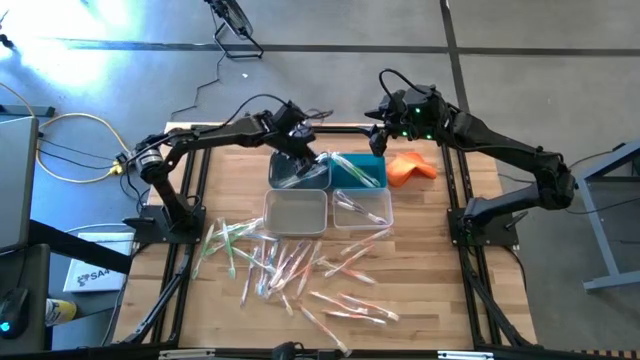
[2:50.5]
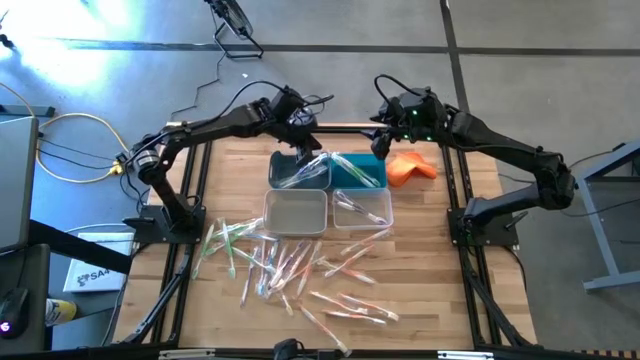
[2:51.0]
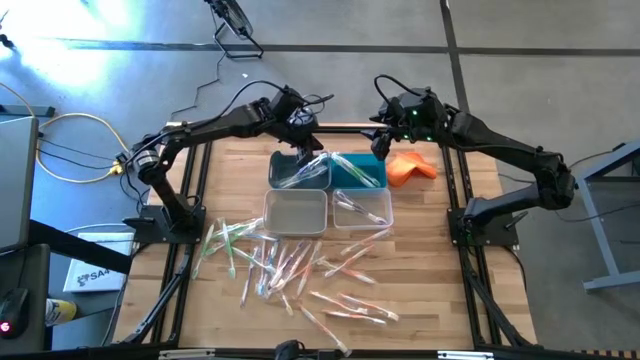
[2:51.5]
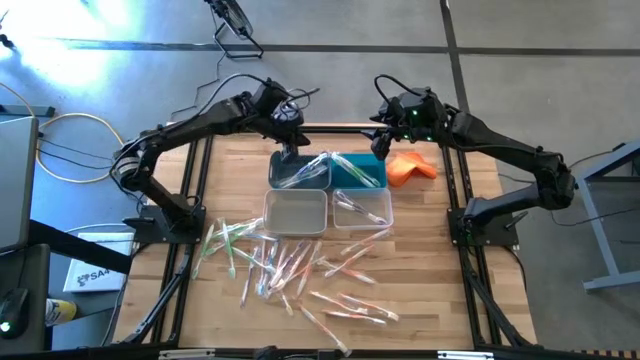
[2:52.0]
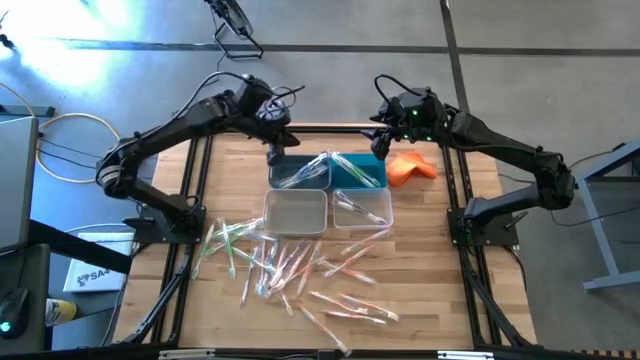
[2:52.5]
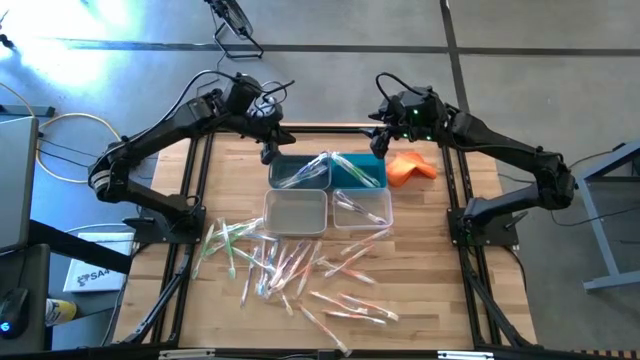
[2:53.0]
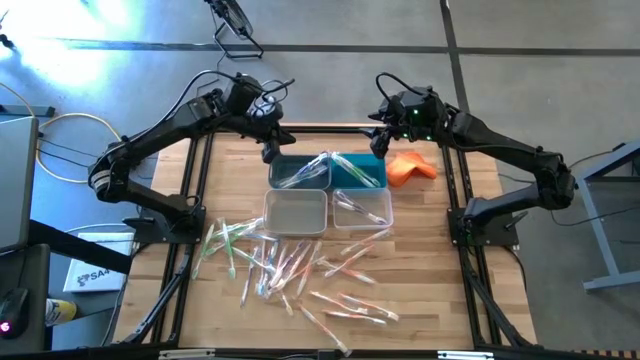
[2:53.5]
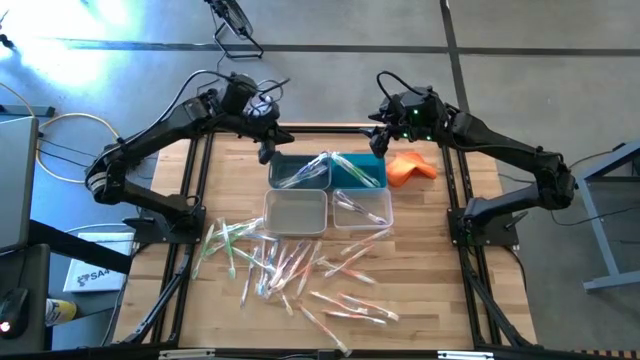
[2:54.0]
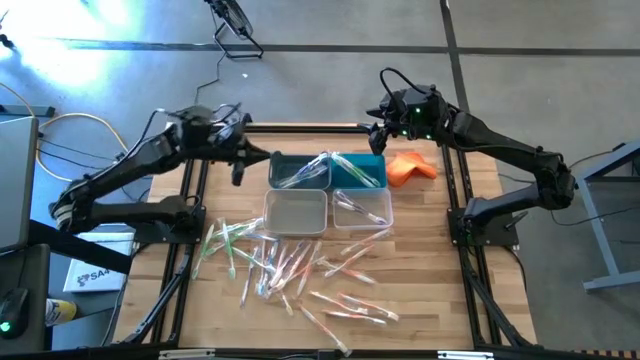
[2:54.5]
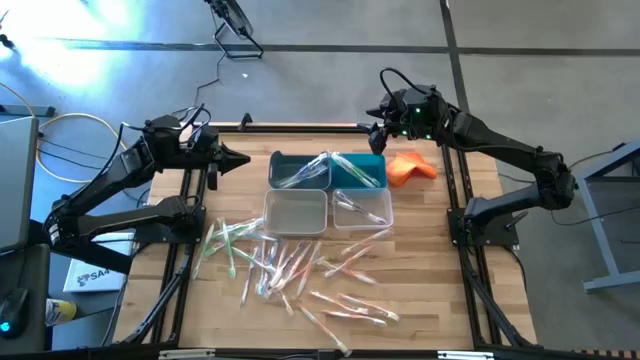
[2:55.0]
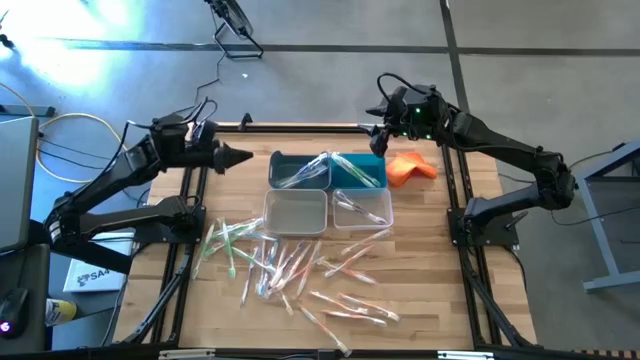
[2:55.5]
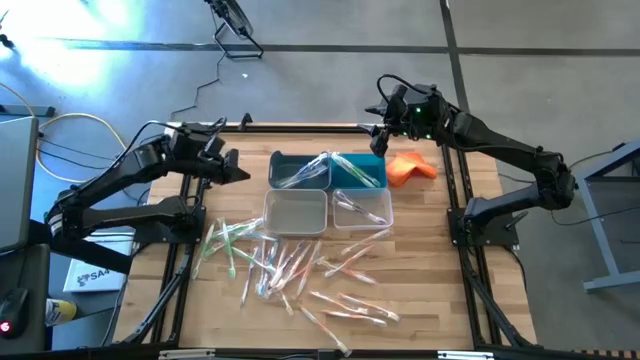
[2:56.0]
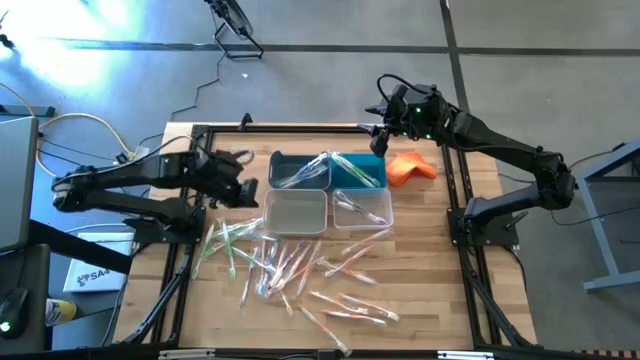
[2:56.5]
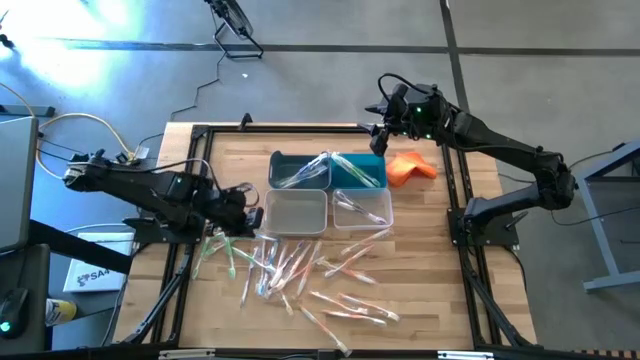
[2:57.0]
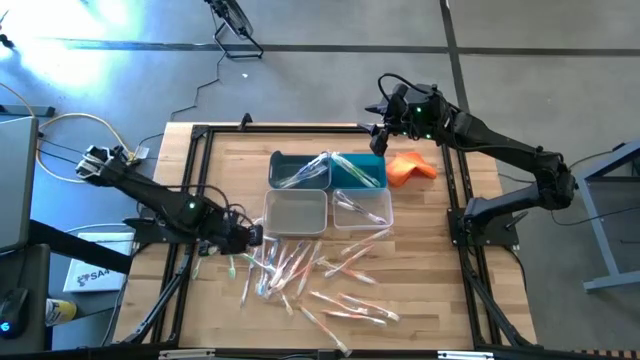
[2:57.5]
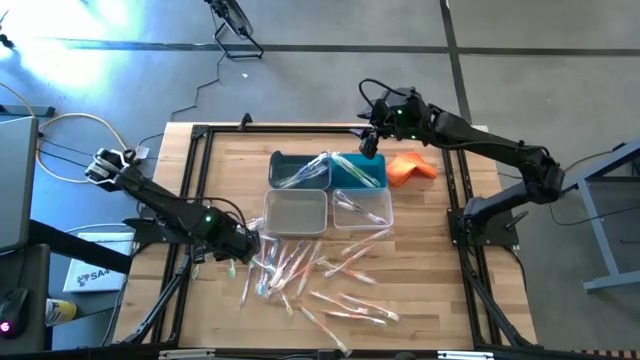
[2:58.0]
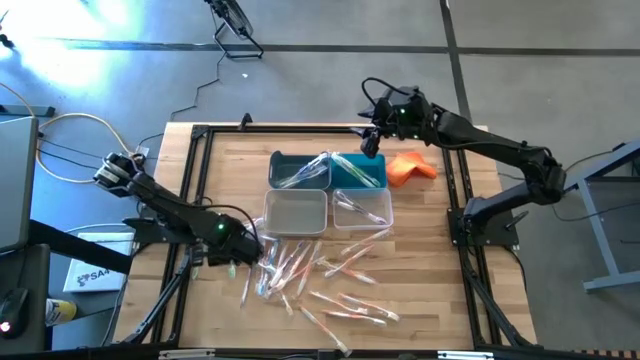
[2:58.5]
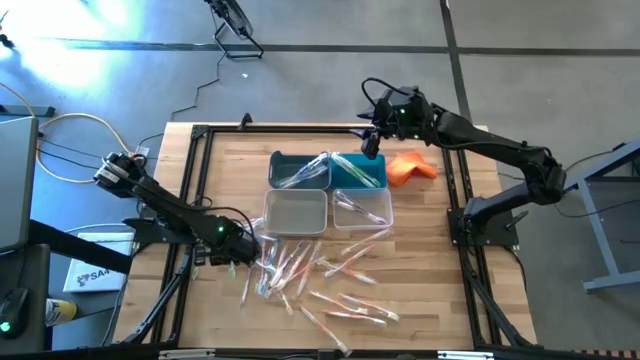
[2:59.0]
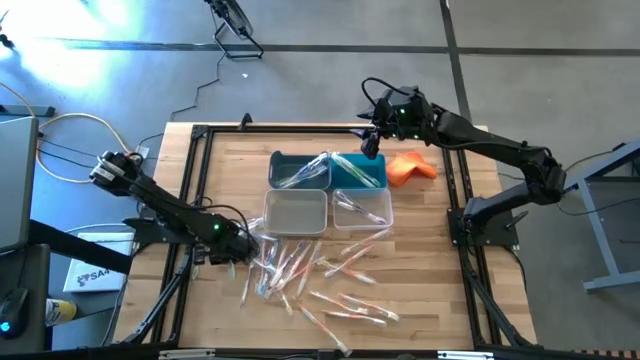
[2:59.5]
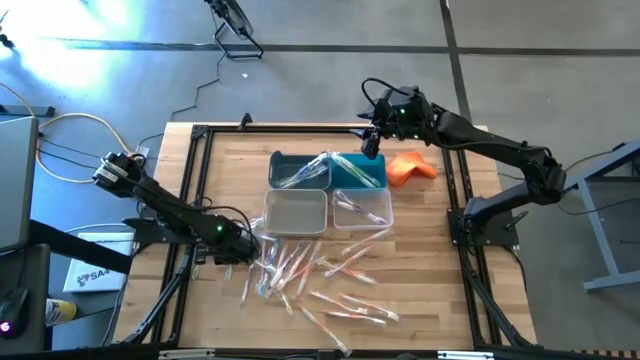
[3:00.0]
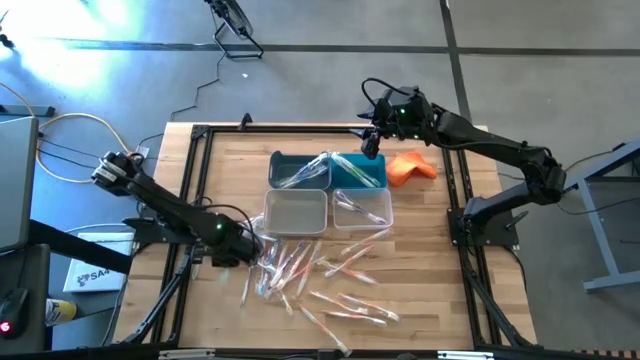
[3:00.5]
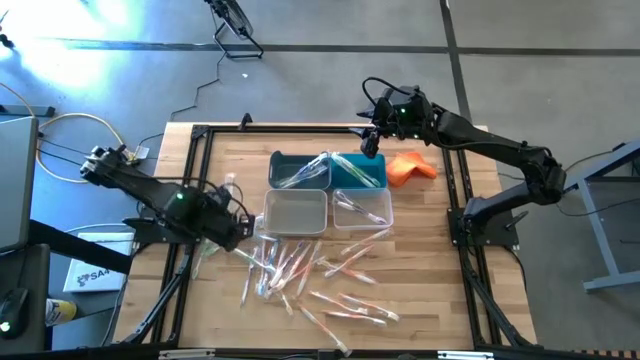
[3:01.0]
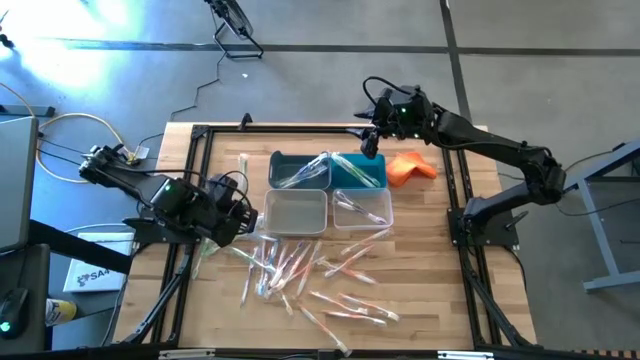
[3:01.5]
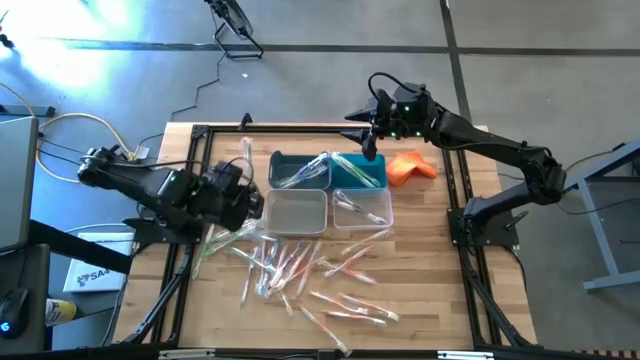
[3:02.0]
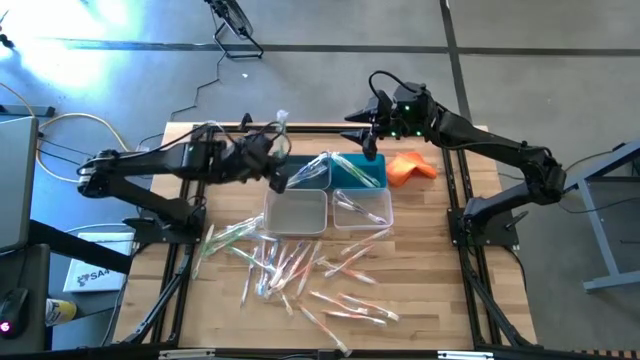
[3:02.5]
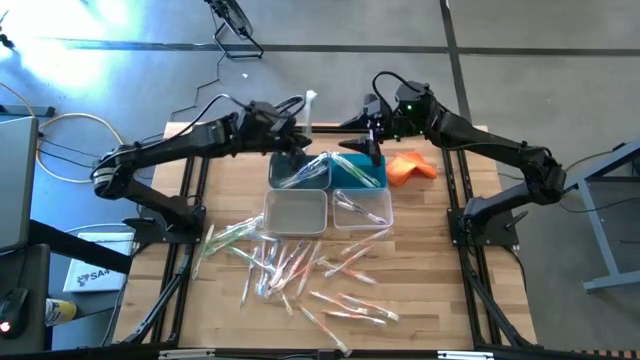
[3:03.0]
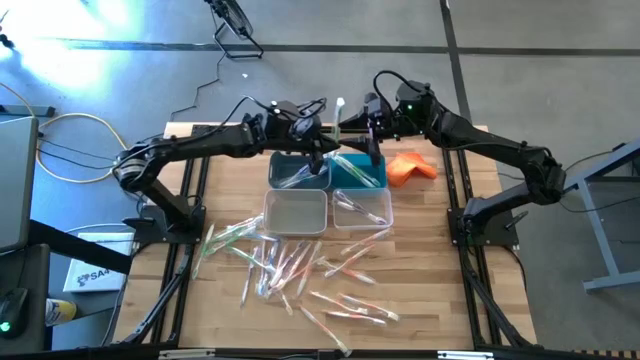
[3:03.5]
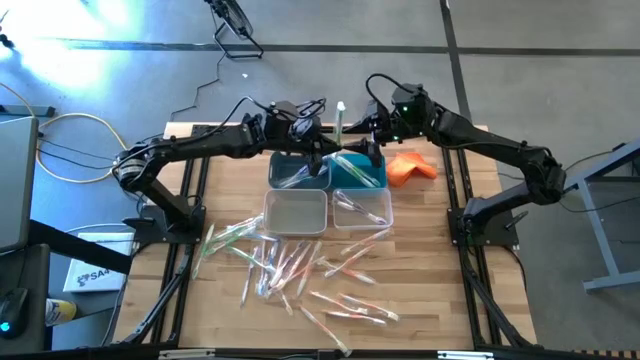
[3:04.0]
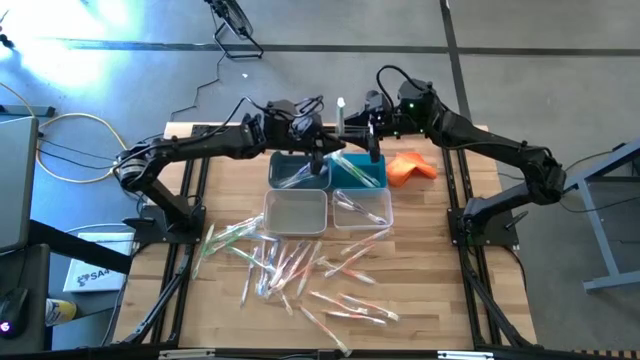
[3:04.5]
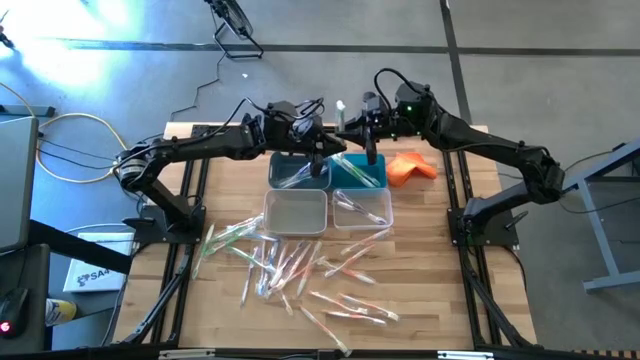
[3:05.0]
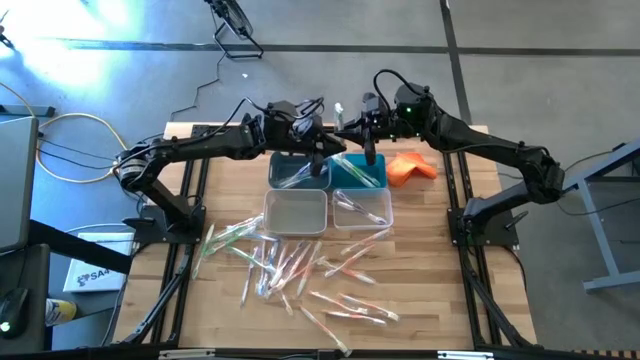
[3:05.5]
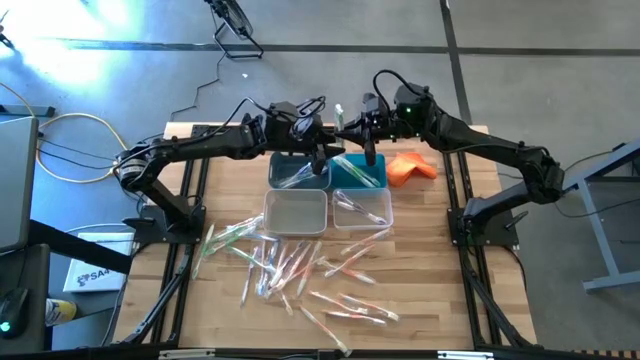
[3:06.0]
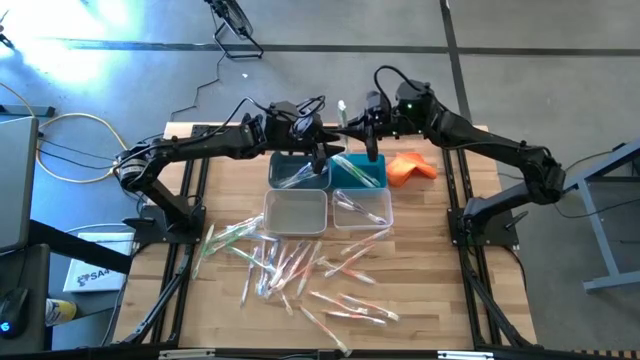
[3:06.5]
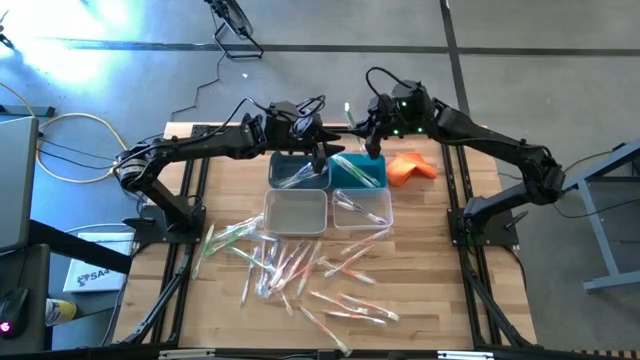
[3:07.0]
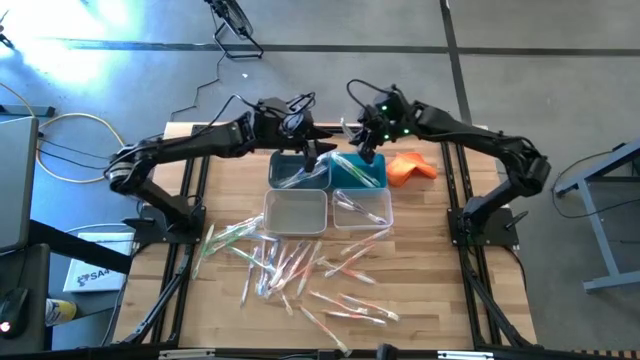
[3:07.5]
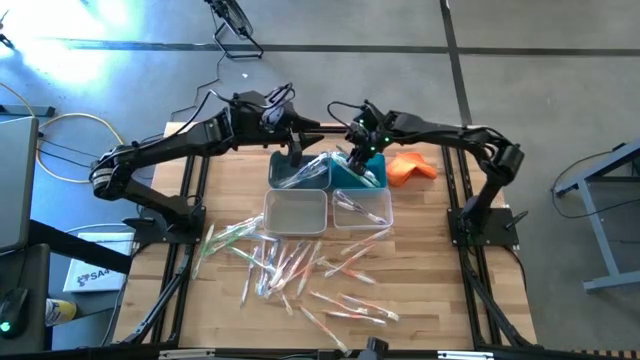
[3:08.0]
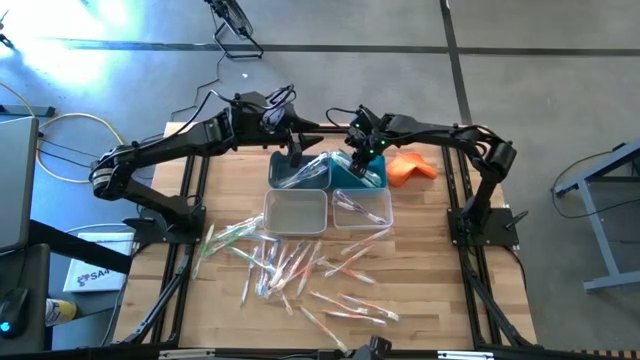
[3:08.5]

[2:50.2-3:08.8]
Task: Pick & Place Toothbrushes
Put the green toothbrush into the blue bin

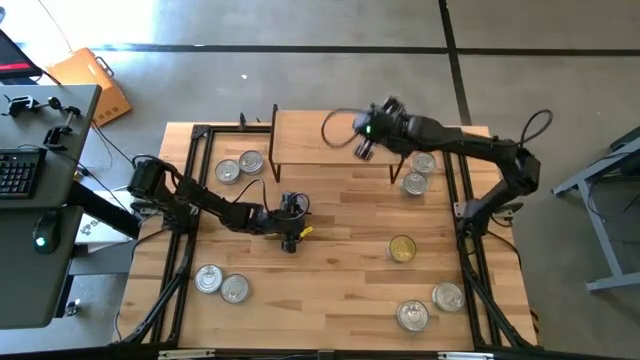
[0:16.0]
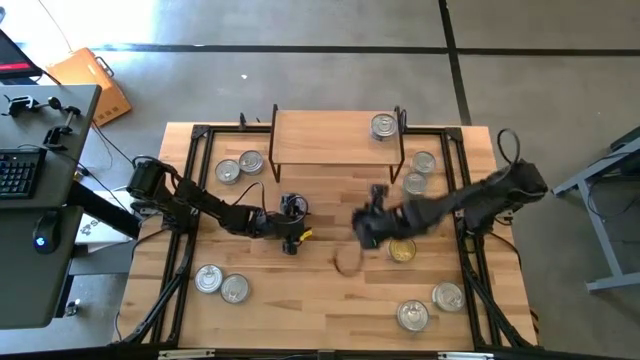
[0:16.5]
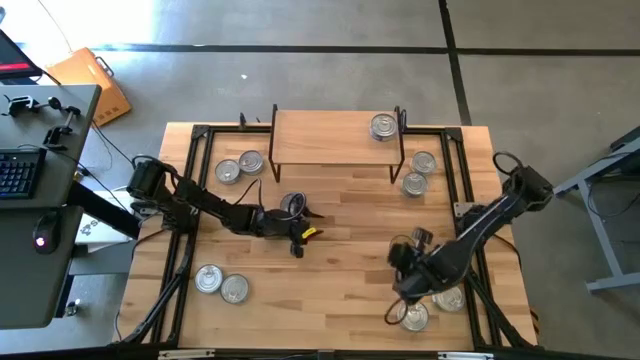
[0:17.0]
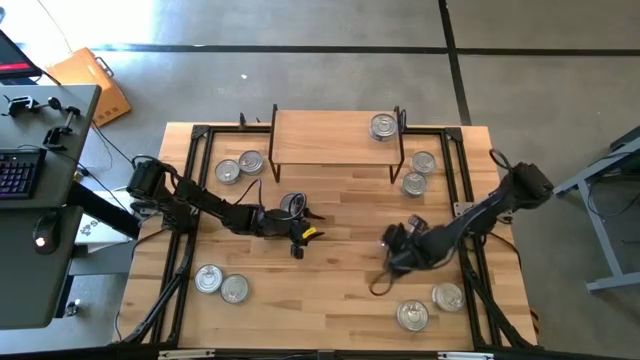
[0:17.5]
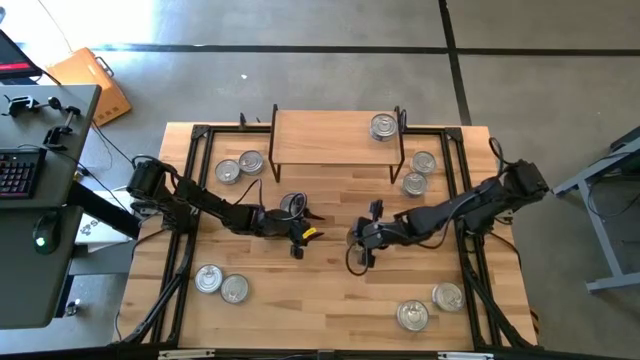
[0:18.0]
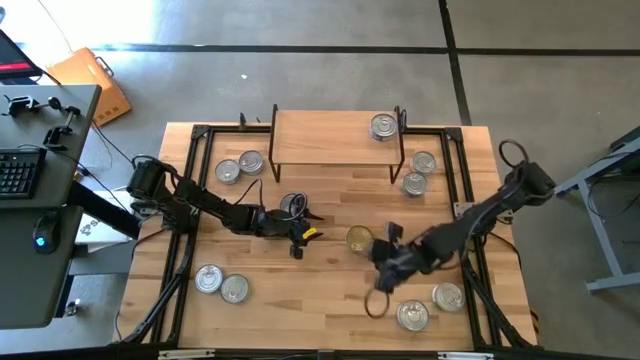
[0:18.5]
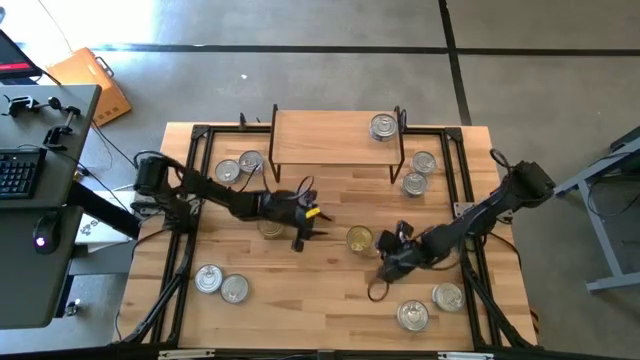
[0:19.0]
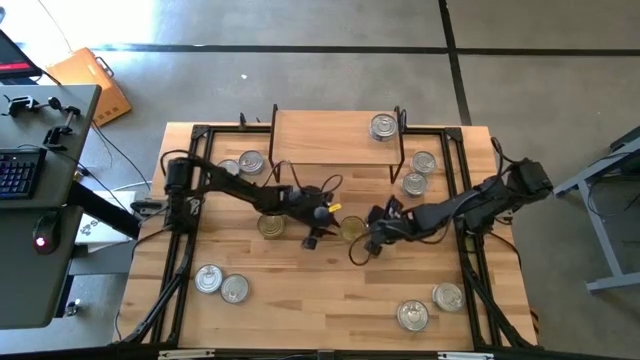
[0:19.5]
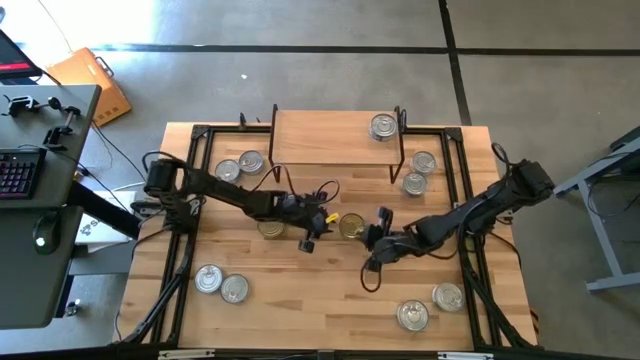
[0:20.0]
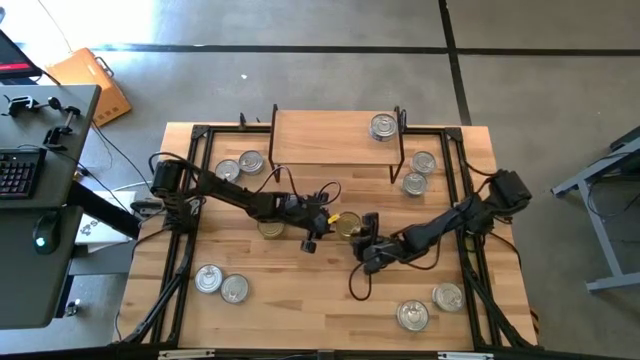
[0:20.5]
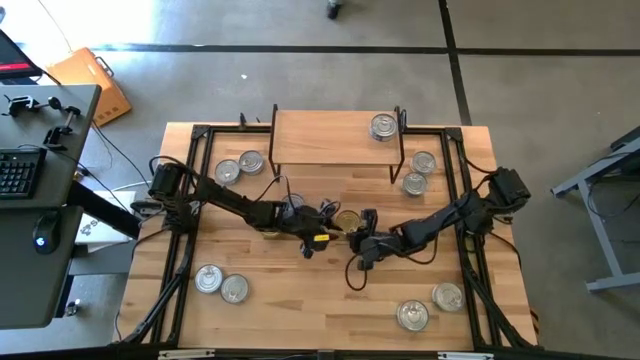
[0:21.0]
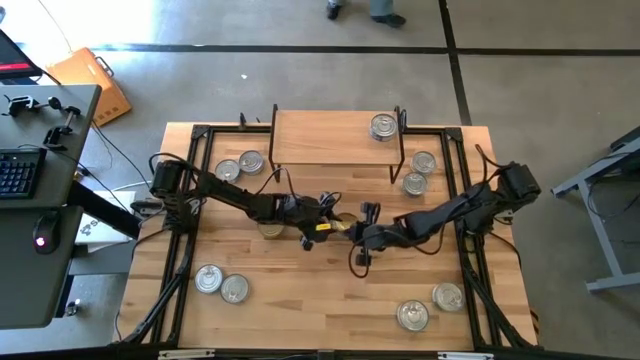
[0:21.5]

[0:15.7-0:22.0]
Task: Stack canned seafood by type on shelf
Put the green tuna can on the shelf
